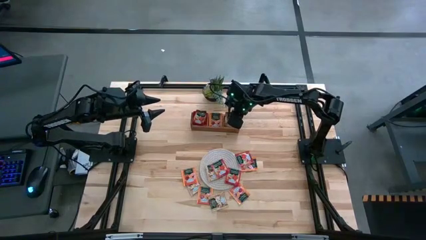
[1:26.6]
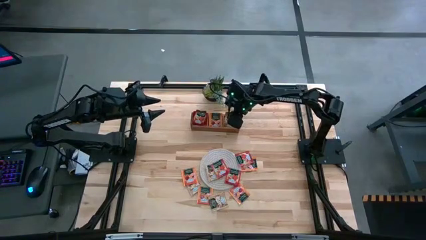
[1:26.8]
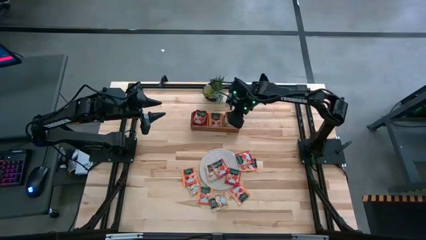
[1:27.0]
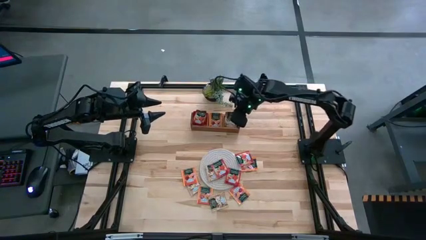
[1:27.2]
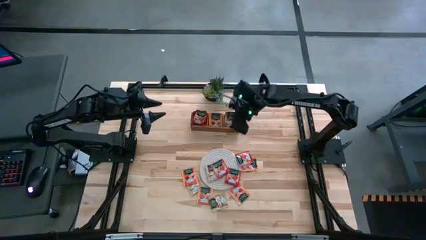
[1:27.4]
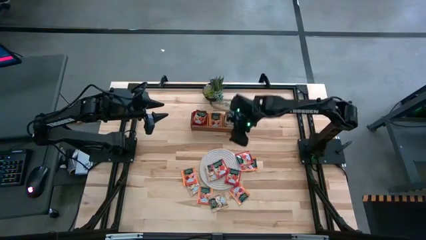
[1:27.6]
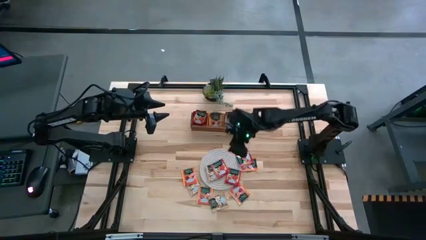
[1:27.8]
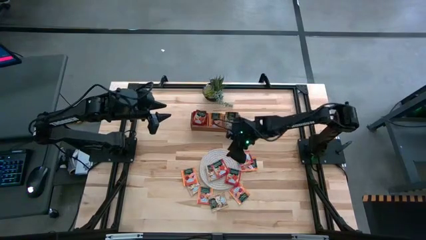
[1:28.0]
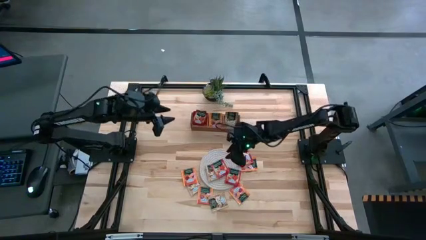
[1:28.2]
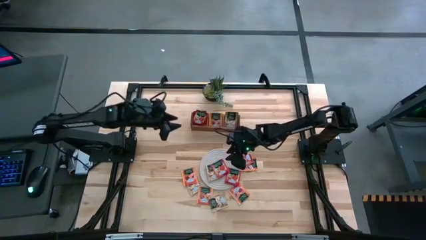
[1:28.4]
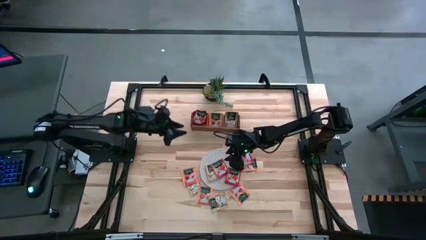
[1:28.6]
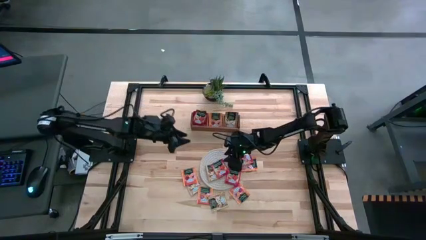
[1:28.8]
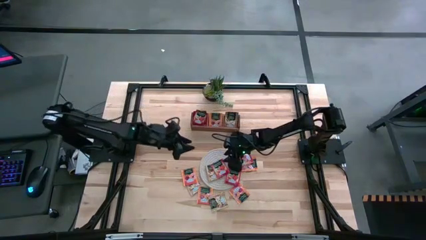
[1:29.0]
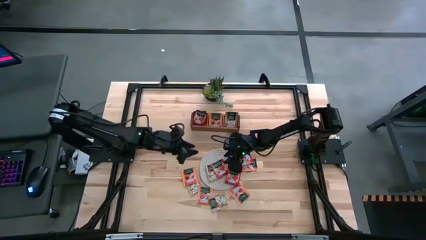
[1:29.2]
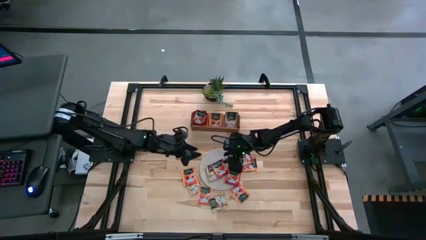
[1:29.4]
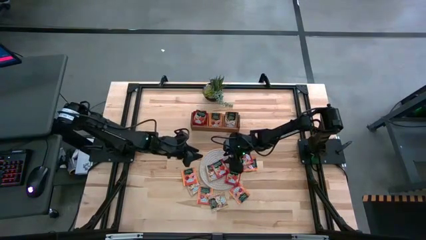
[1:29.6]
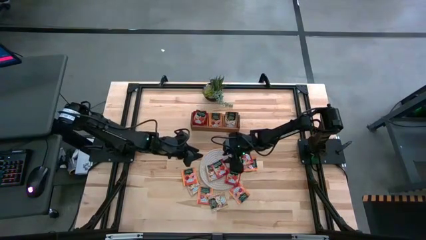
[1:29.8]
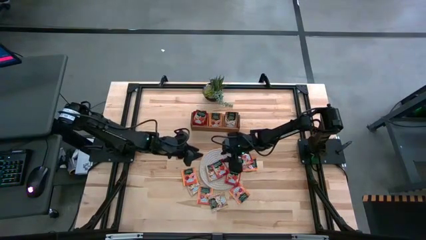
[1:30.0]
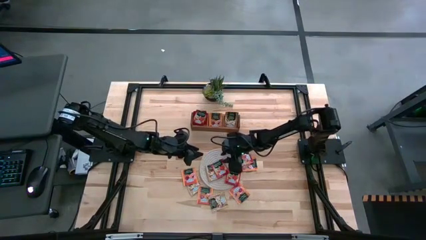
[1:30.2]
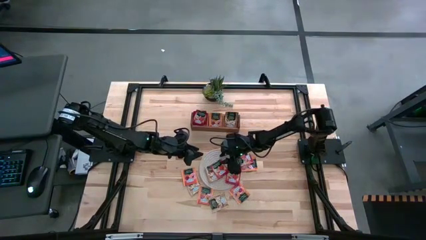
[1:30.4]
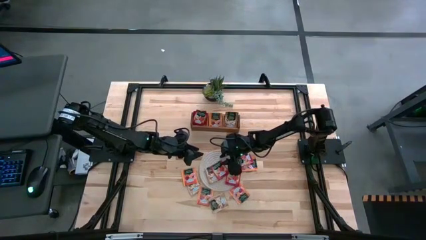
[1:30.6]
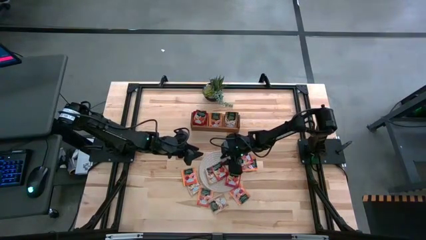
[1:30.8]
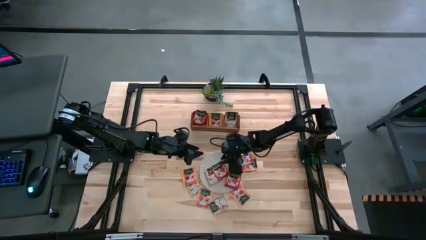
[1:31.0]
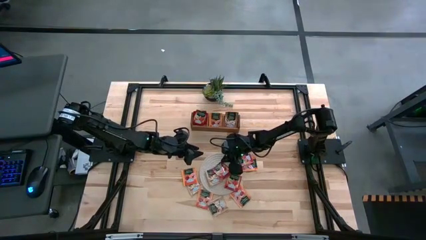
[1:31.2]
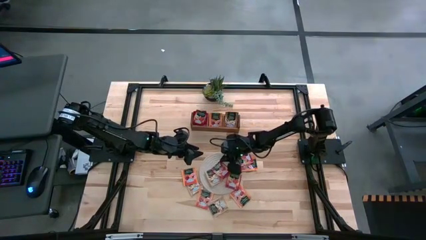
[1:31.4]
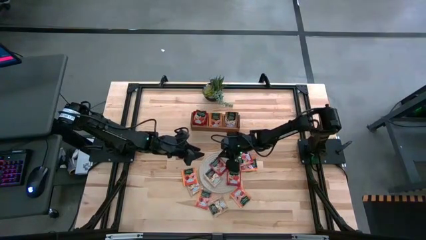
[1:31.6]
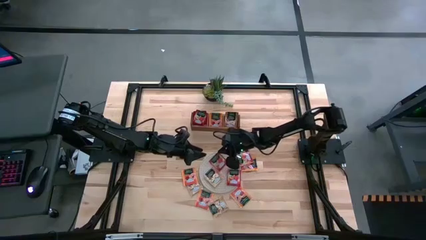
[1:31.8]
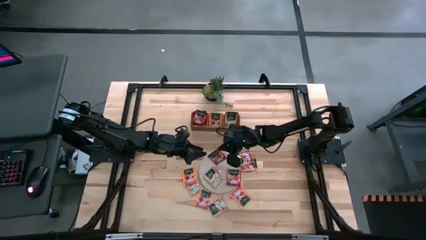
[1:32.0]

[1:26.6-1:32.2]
Task: Pick & Place Tea
Put the red tea bag into the left section of the wooden organizer

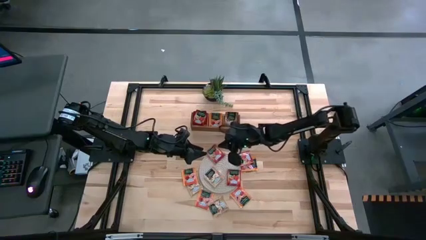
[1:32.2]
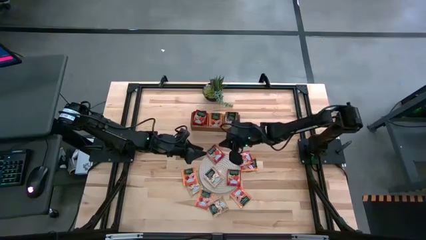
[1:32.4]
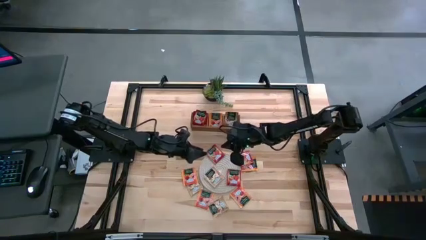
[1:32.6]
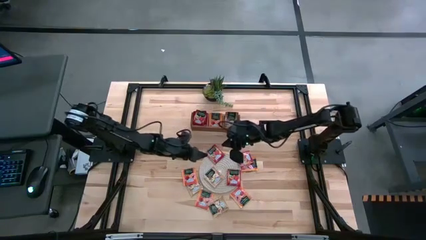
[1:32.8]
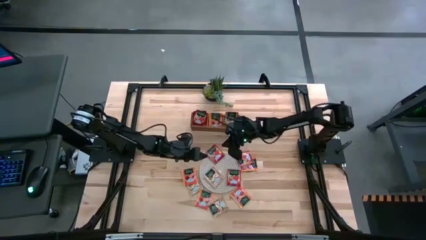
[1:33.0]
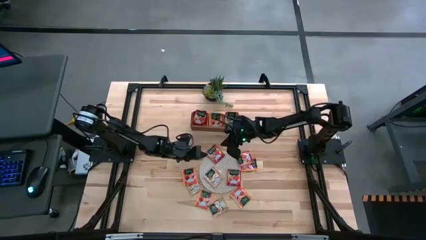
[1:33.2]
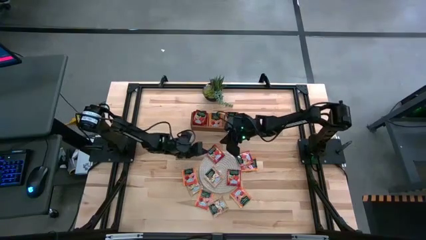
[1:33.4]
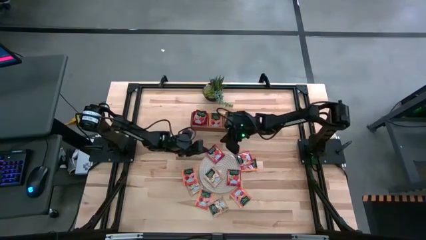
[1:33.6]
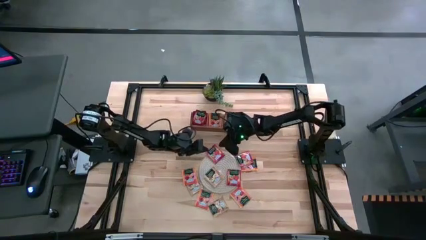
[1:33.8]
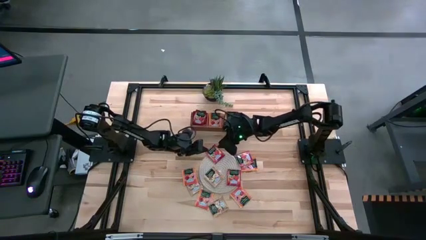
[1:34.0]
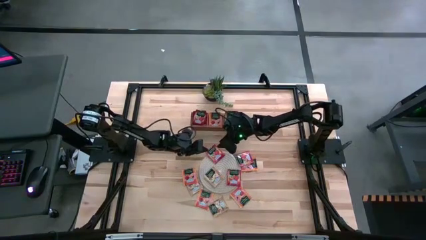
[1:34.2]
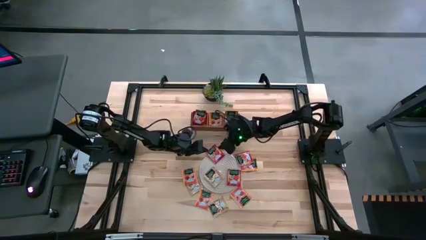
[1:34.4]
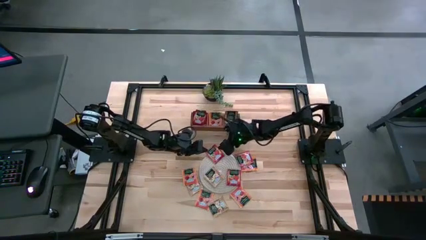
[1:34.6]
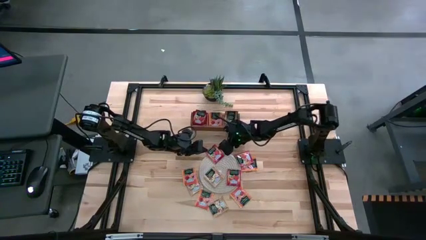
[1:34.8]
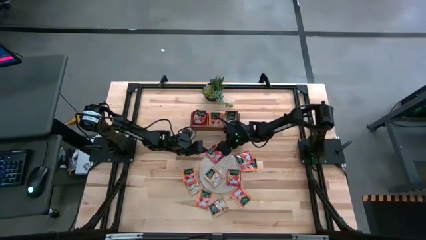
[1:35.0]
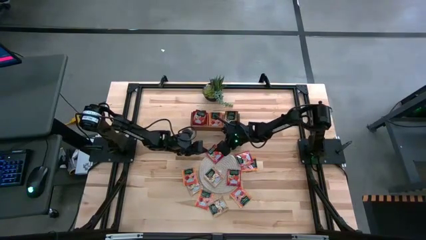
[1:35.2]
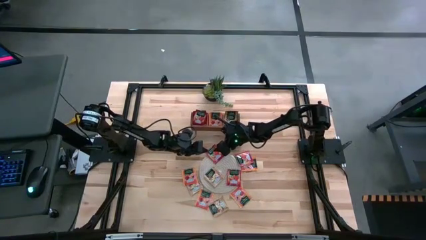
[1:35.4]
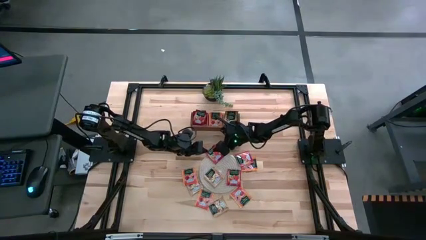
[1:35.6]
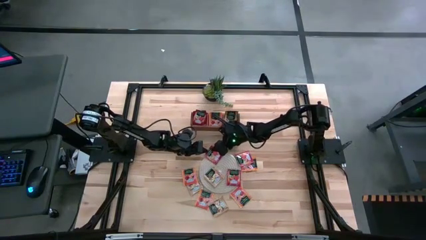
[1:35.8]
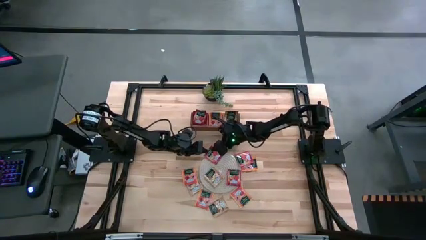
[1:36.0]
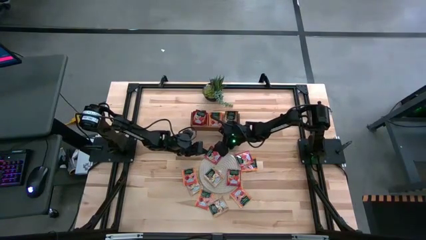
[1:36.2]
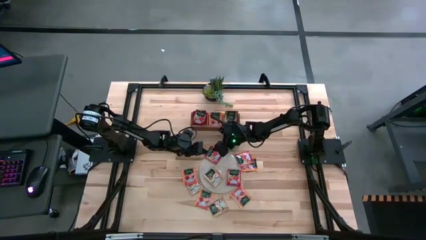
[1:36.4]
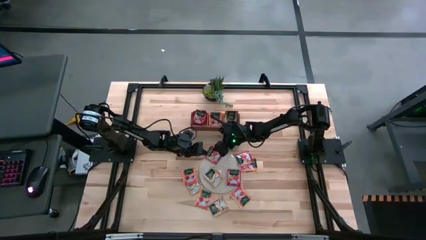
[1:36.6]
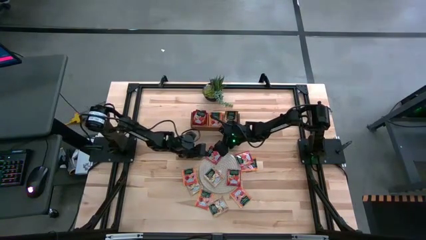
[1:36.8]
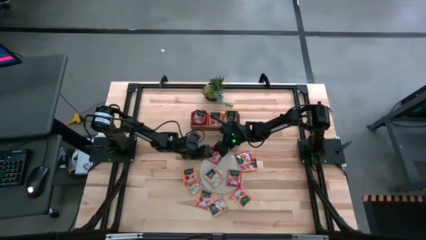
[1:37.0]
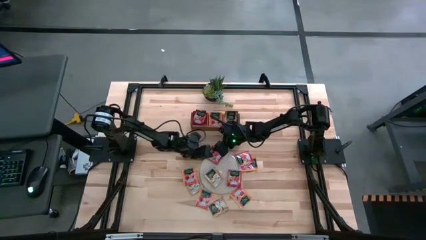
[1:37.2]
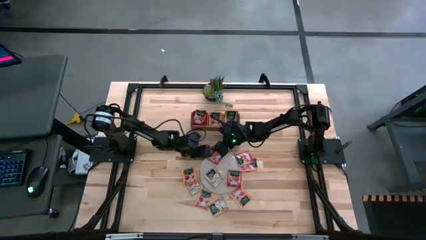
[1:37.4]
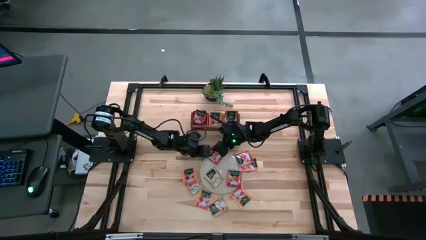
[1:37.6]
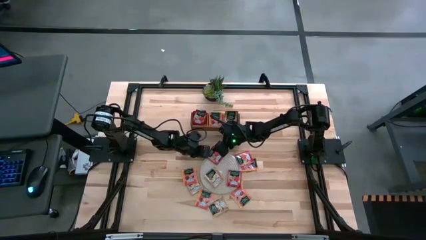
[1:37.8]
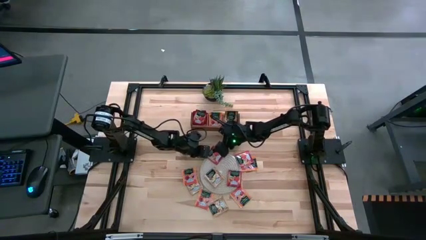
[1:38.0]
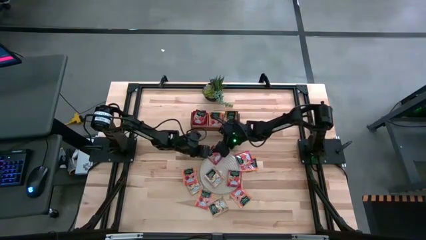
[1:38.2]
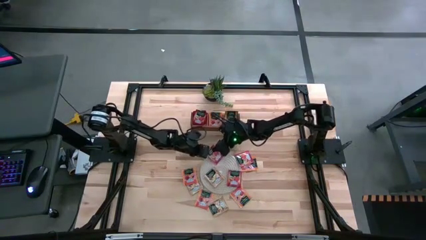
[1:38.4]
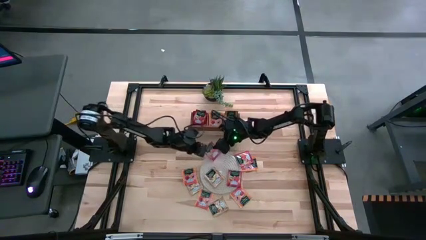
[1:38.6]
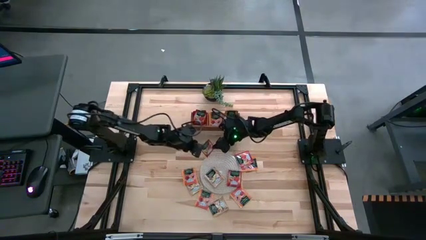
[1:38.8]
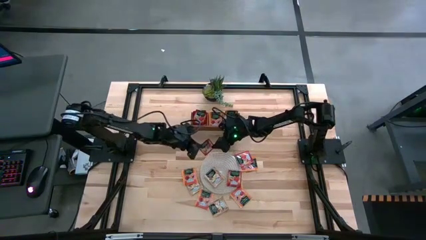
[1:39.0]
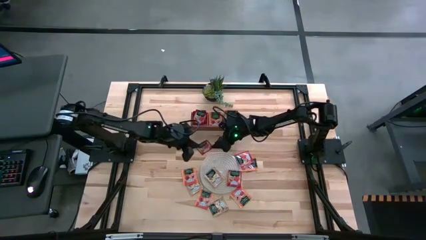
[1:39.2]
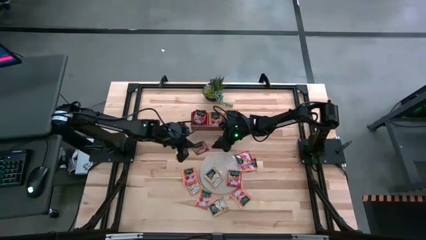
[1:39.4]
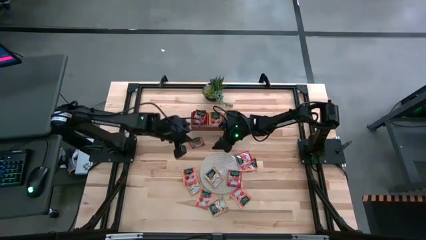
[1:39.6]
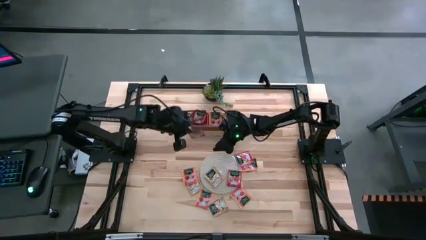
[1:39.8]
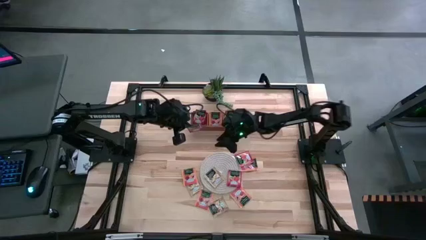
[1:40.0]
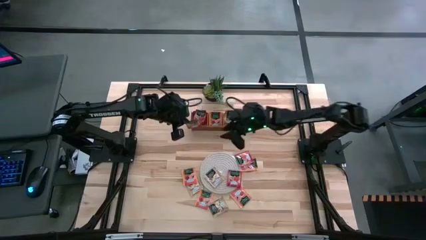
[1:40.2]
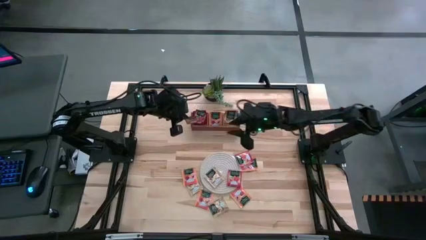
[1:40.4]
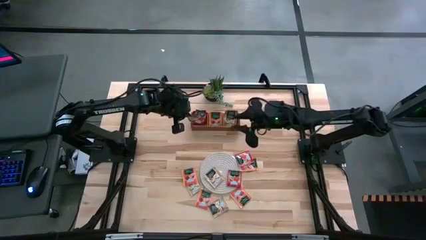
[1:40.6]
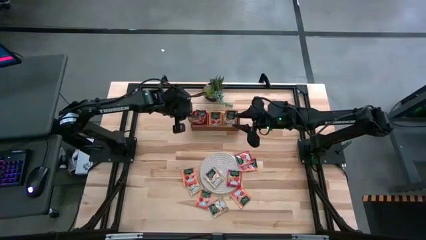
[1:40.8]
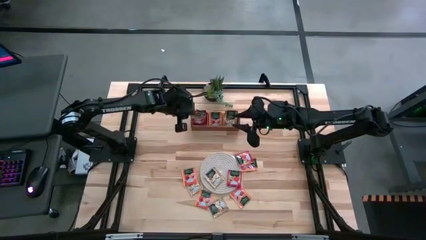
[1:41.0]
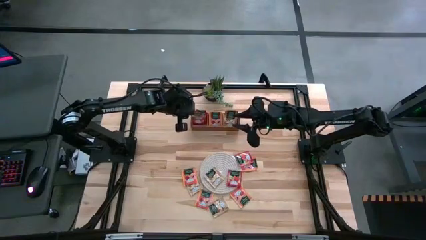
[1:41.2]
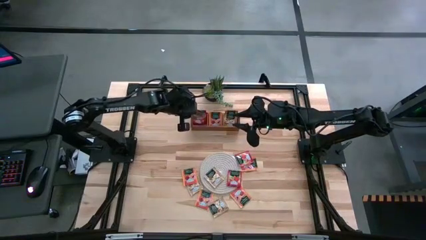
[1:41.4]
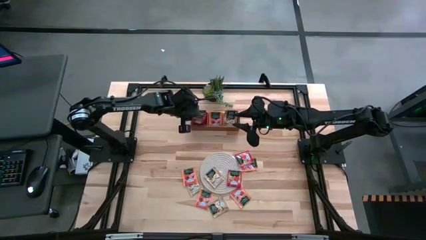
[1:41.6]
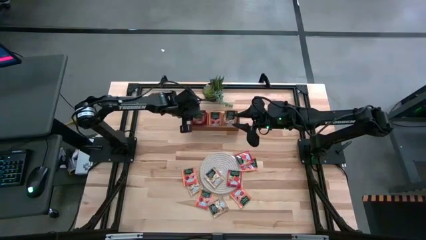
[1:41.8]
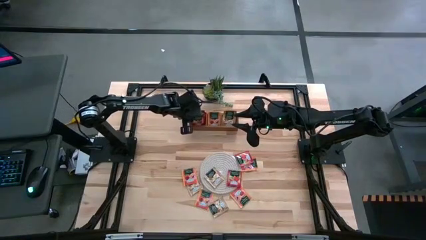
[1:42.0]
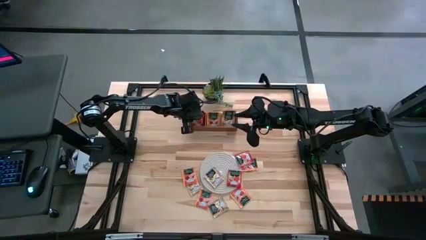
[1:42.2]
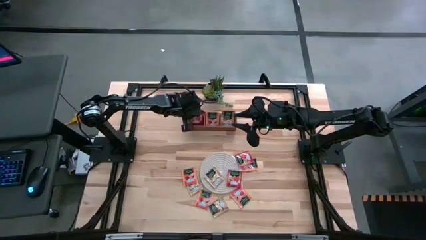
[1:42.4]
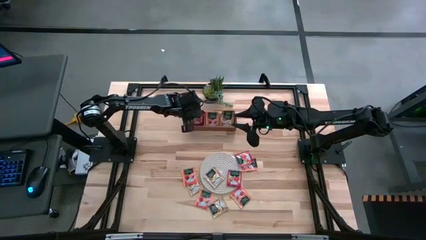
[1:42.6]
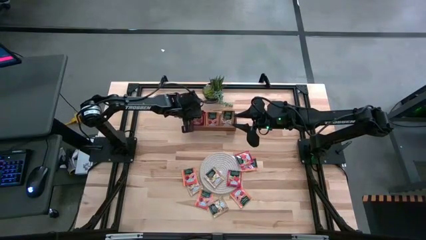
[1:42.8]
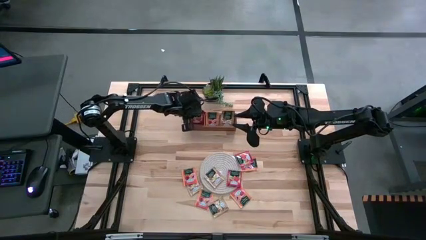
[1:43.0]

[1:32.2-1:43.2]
Put the red tea bag into the left section of the wooden organizer
